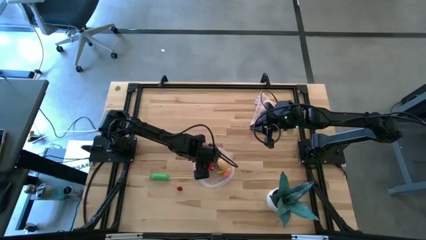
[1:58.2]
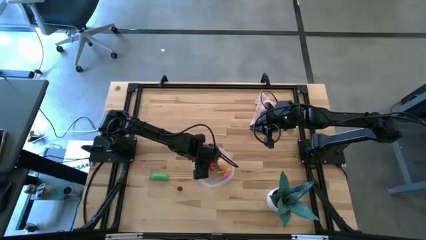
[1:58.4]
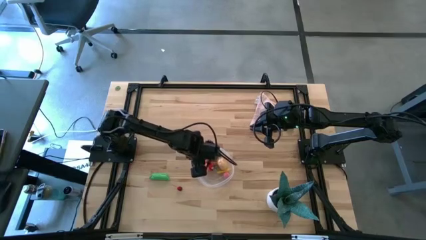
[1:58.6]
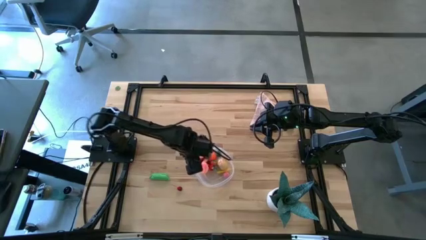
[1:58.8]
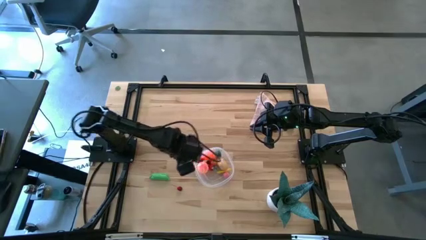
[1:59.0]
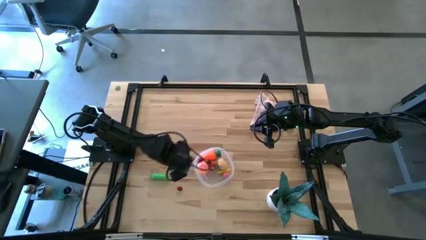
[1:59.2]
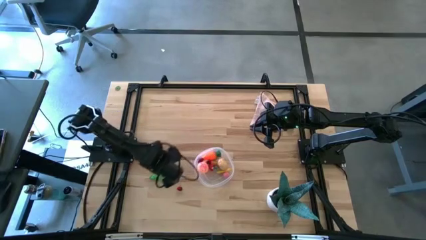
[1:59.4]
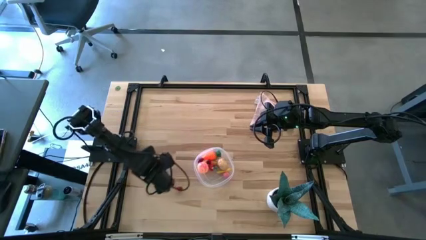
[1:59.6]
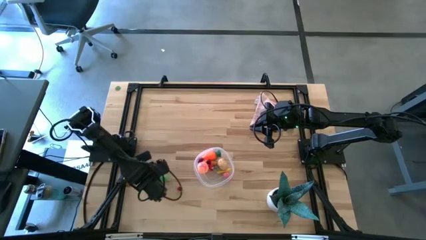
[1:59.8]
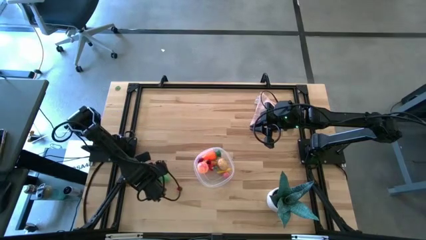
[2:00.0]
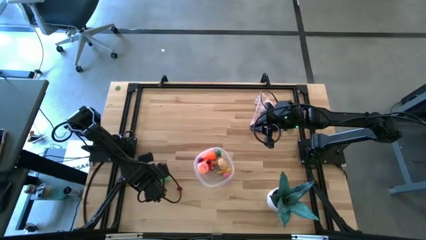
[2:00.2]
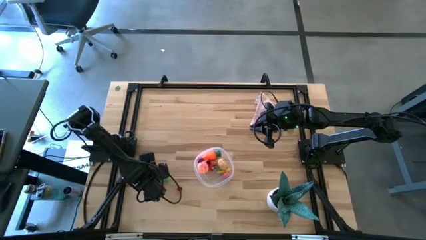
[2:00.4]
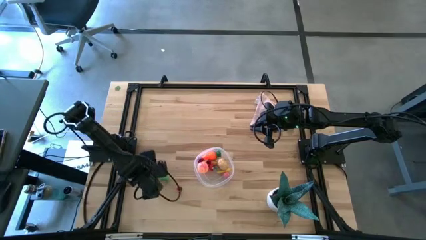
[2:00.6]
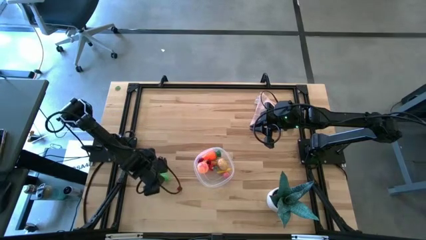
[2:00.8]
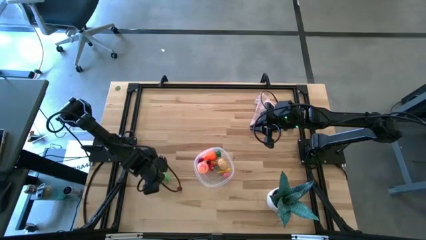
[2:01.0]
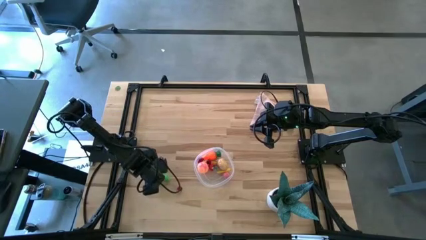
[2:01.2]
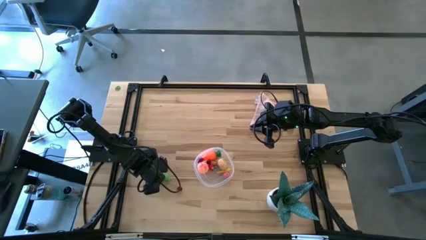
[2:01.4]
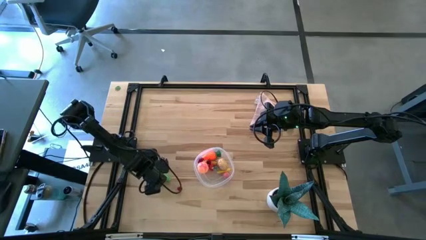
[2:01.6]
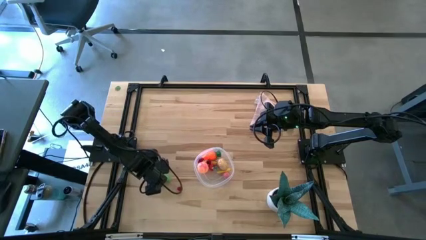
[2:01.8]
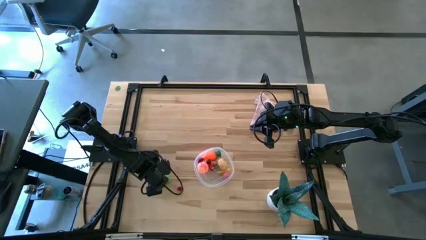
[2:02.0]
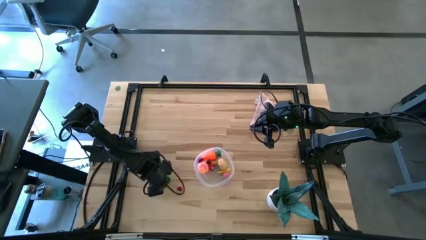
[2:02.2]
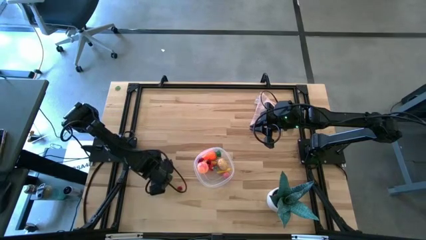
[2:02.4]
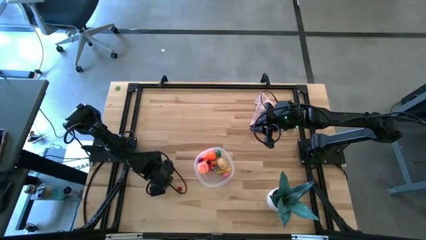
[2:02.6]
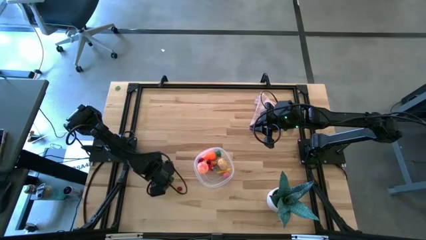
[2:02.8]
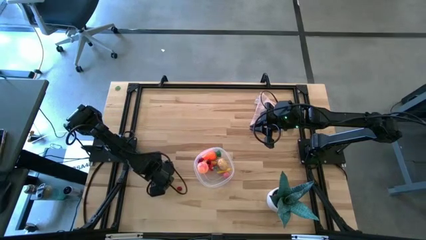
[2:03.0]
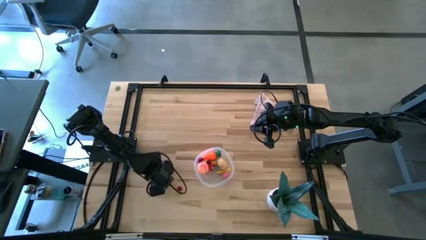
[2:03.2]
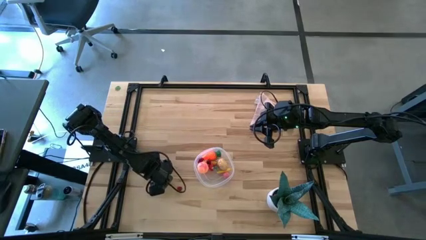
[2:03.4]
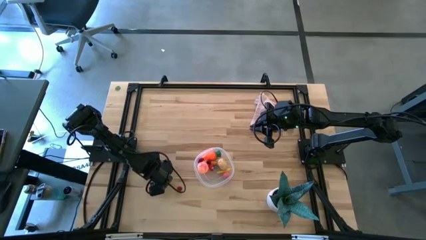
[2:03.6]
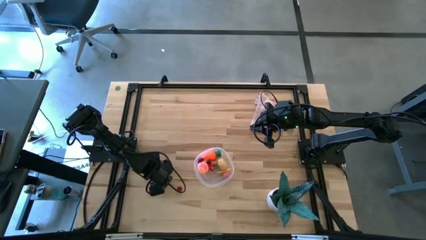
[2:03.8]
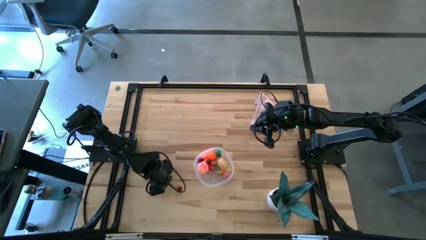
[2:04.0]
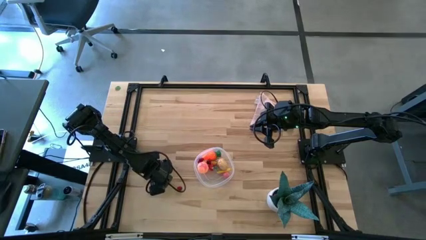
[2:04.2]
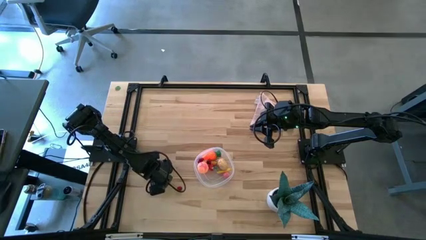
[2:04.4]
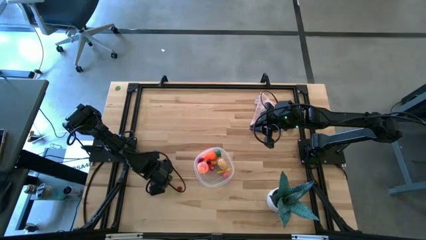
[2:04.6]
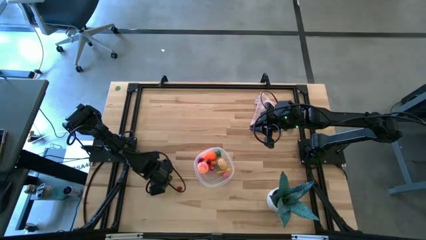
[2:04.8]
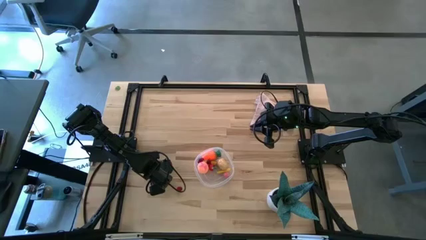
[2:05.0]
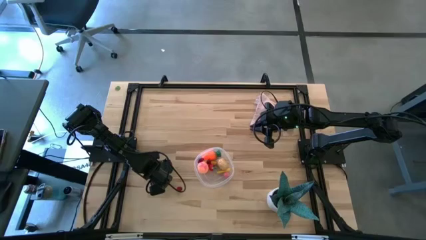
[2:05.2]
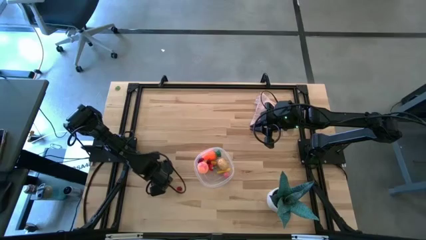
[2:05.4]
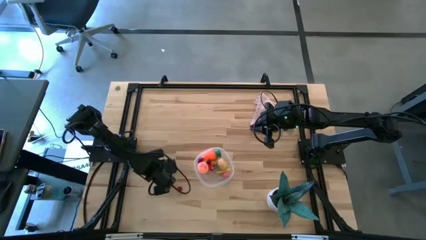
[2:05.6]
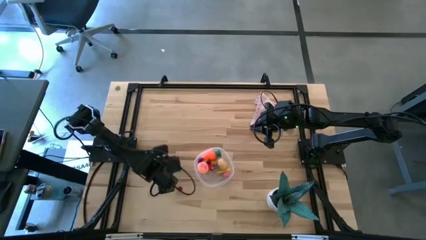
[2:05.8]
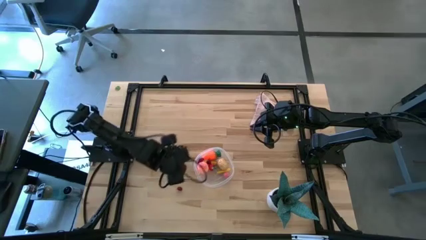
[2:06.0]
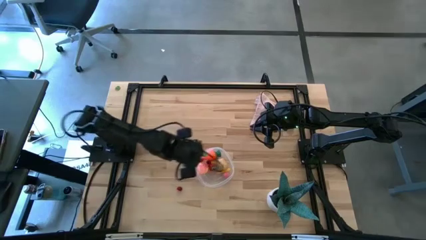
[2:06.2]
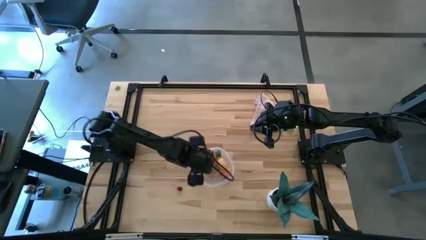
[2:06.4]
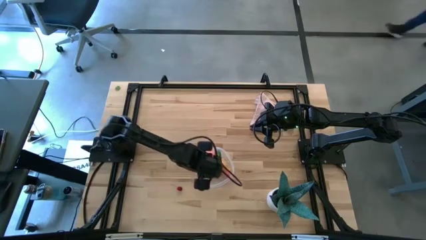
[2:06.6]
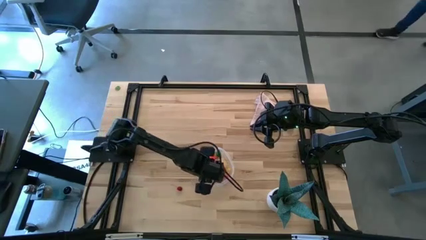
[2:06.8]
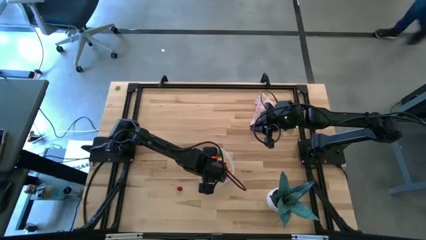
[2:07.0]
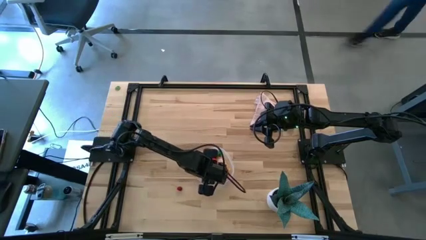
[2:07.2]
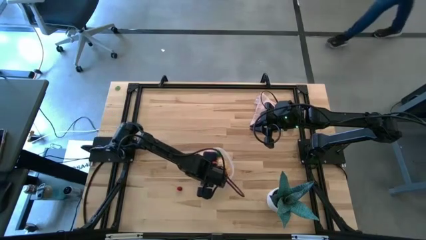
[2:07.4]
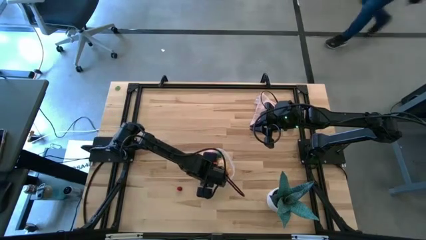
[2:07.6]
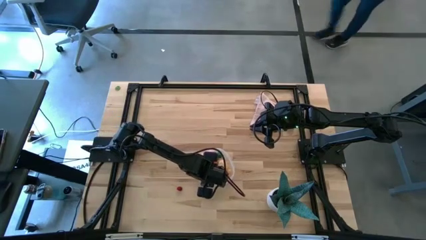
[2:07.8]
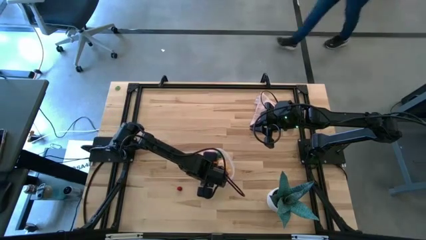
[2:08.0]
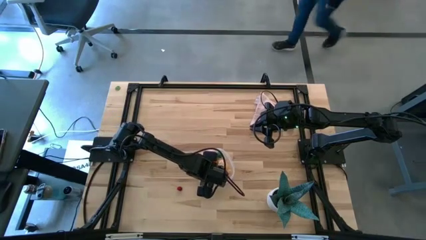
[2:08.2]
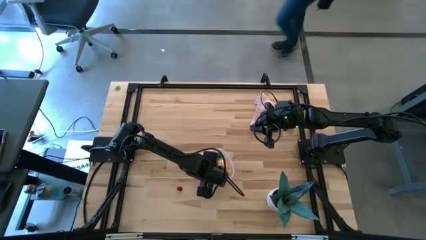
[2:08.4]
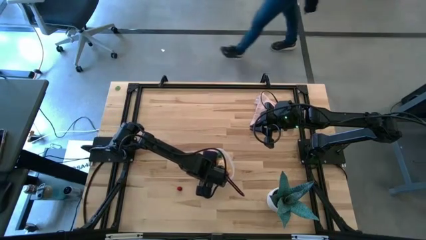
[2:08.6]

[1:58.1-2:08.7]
Task: Pick and placing Produce into tupperware
Put the peas into the transparent bin

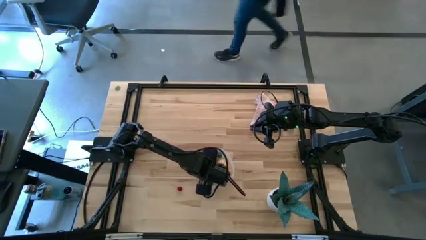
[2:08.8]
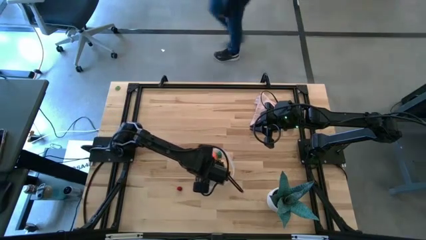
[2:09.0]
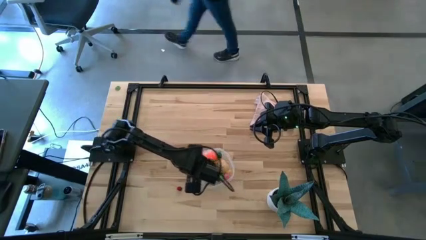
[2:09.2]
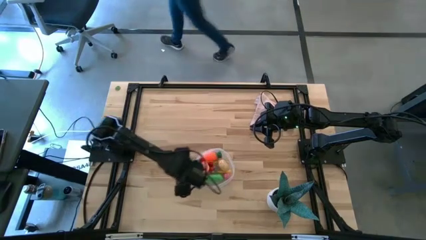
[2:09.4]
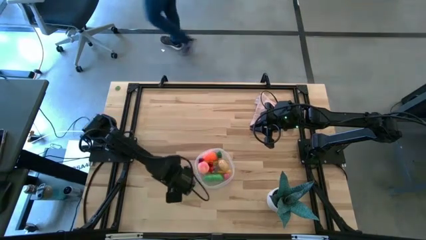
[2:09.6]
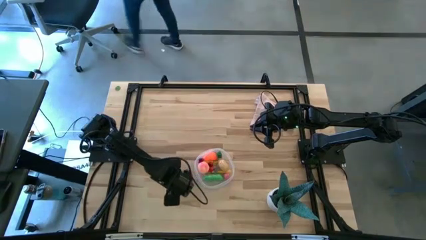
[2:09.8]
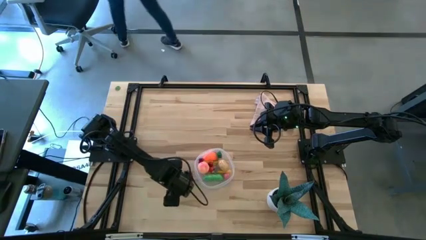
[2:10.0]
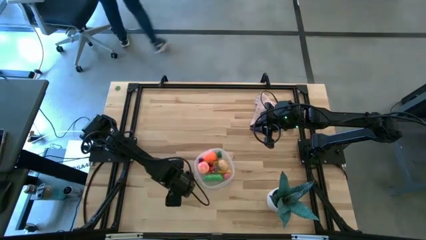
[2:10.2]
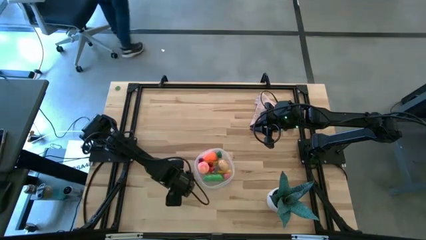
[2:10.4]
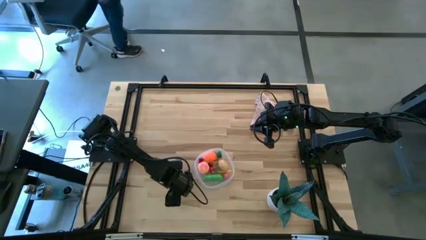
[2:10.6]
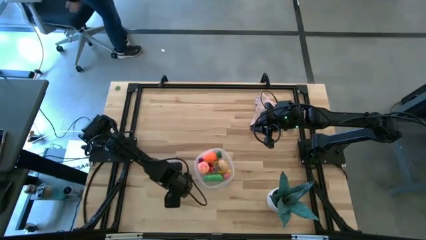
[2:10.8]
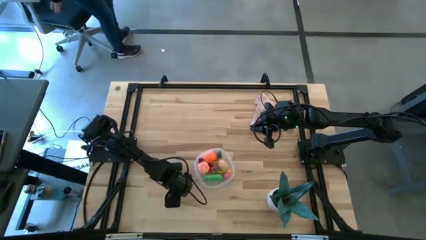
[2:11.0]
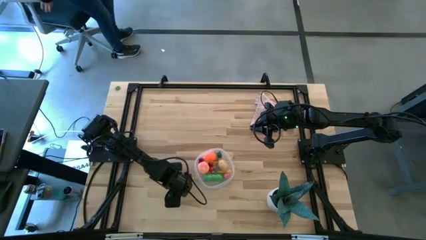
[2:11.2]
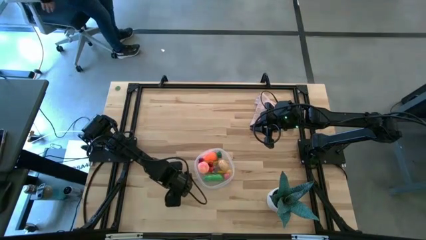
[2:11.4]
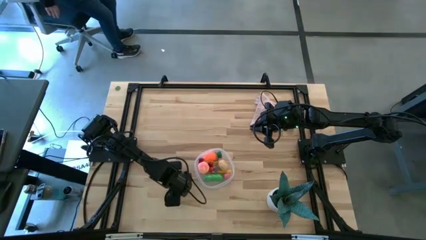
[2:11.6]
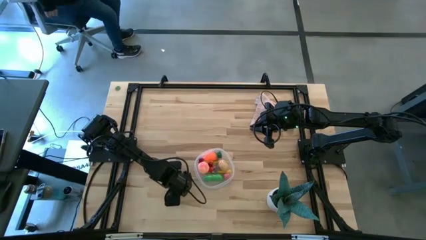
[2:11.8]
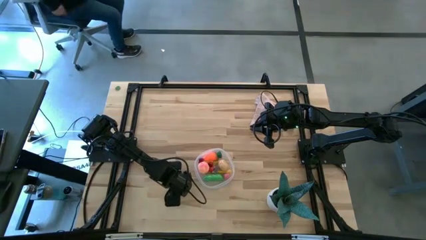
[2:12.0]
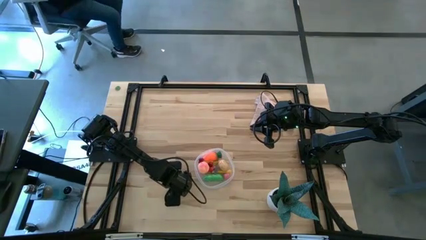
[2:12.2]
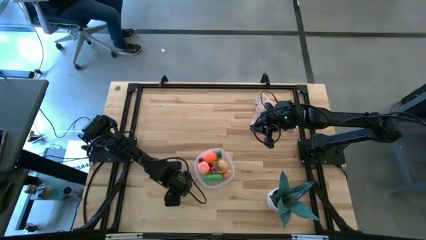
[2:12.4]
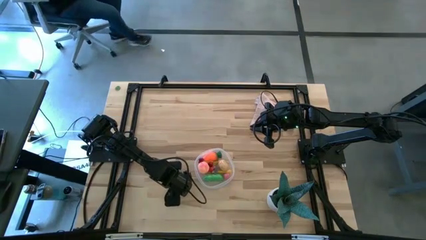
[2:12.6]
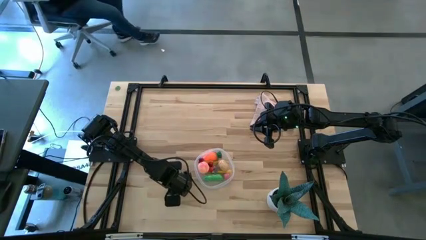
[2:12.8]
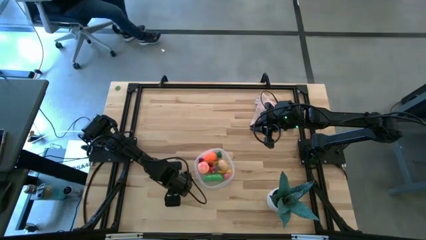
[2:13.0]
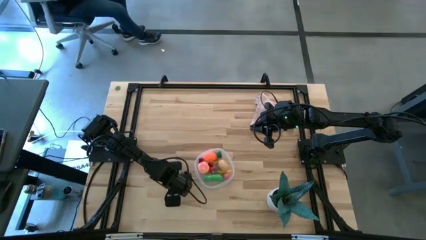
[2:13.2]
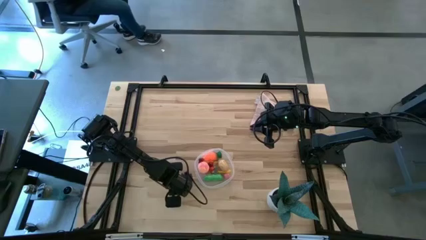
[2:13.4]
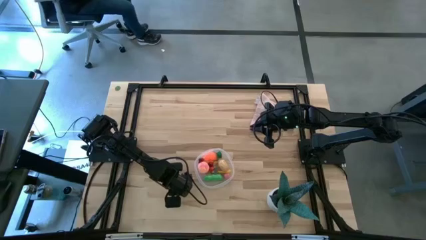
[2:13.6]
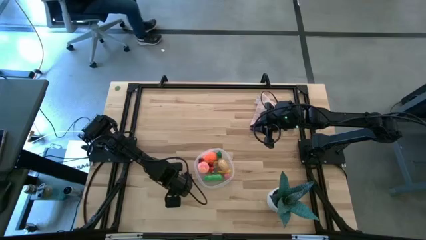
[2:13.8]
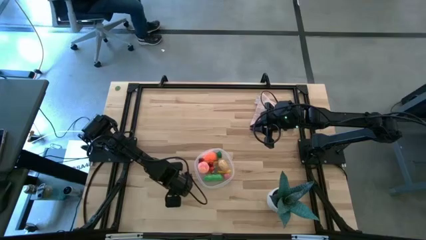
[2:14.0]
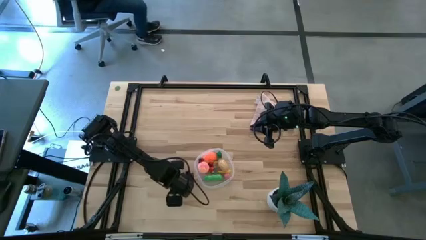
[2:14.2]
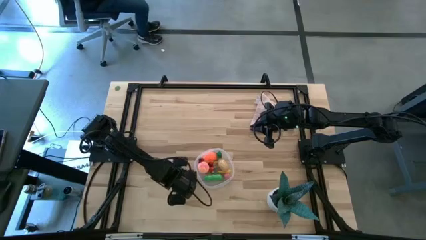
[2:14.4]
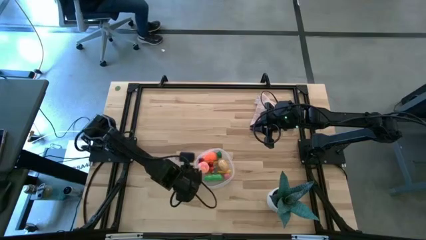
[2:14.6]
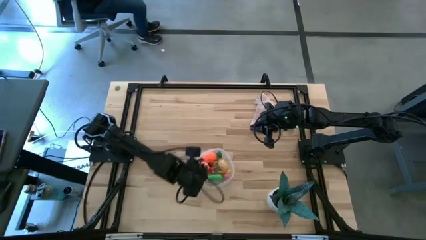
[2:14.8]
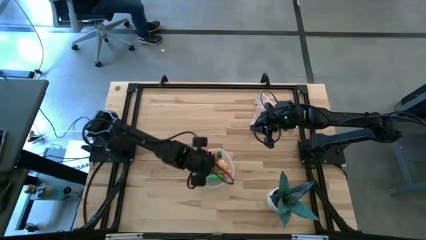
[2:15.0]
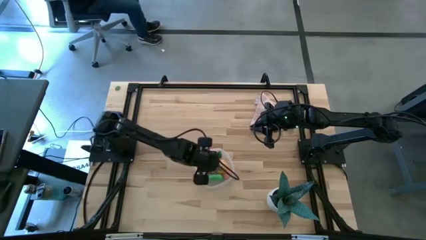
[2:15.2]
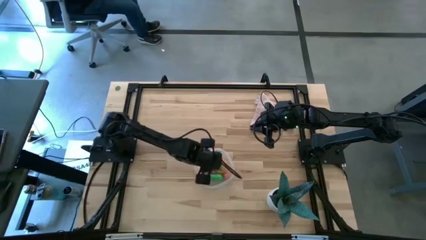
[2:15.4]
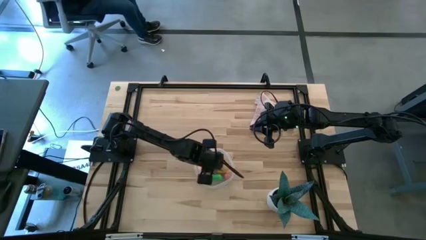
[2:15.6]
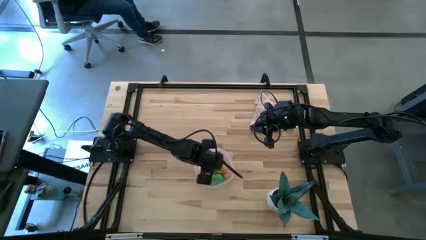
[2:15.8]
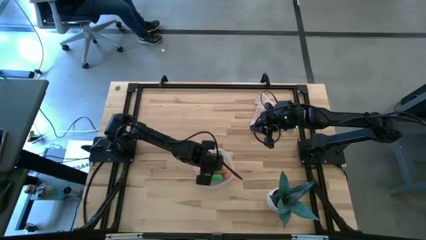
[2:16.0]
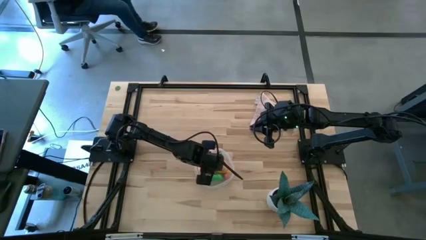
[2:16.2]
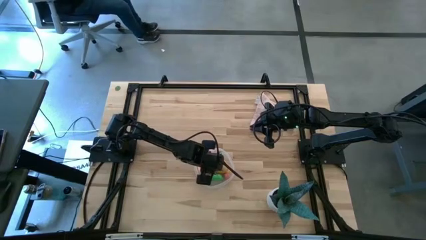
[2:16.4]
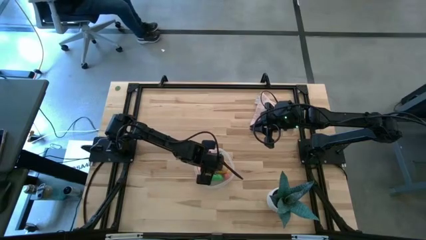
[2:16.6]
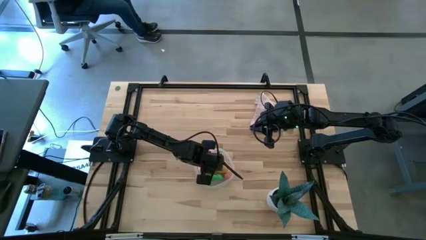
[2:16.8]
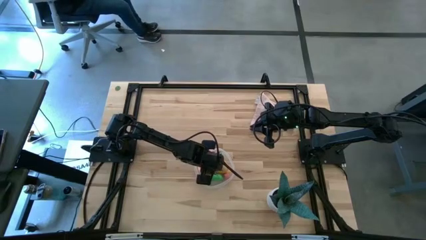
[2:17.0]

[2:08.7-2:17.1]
Put the cherry into the transparent bin
